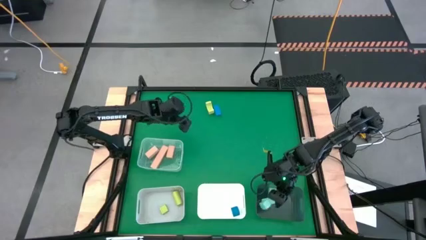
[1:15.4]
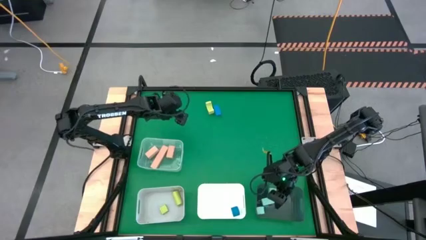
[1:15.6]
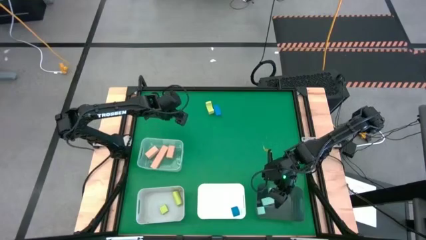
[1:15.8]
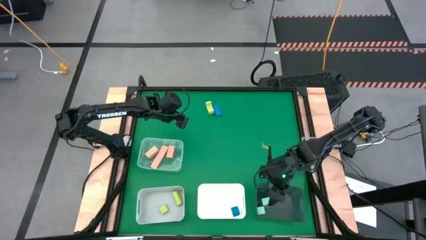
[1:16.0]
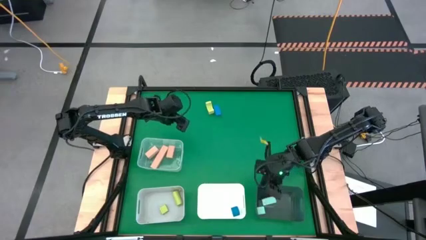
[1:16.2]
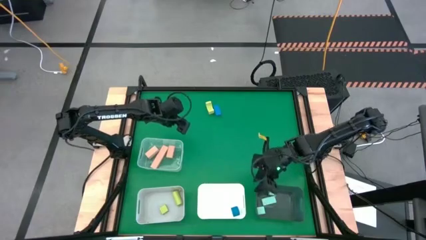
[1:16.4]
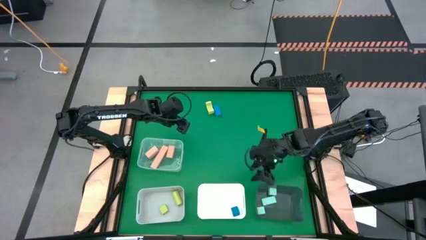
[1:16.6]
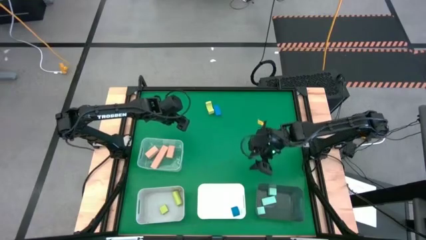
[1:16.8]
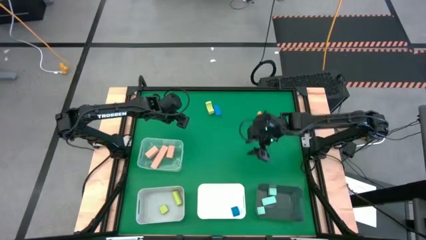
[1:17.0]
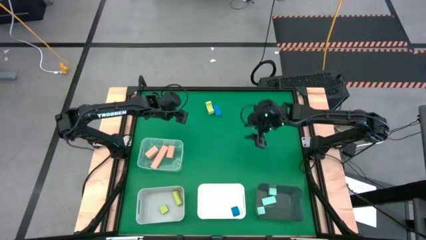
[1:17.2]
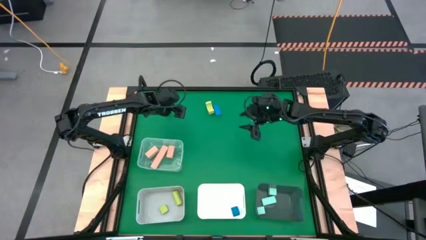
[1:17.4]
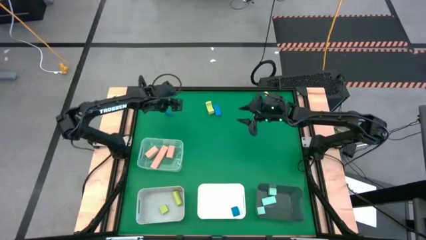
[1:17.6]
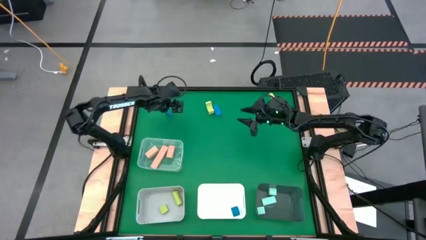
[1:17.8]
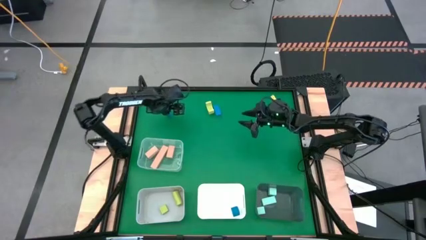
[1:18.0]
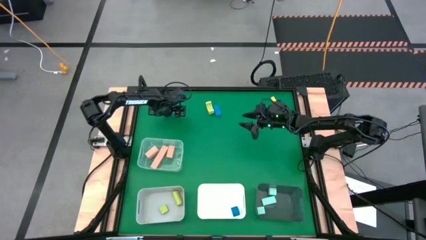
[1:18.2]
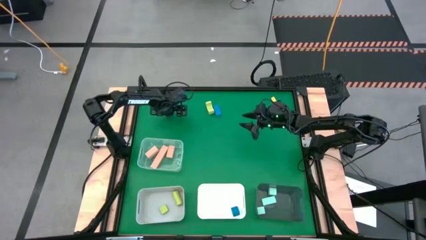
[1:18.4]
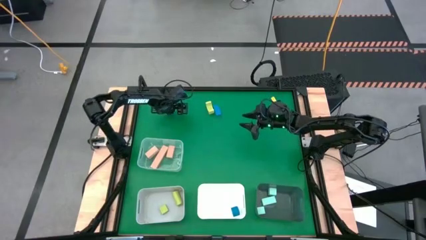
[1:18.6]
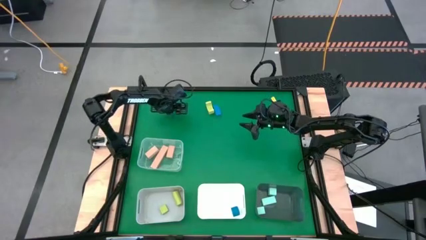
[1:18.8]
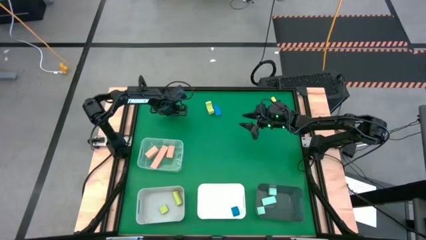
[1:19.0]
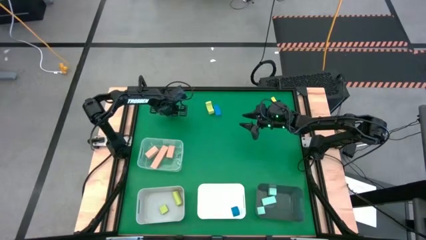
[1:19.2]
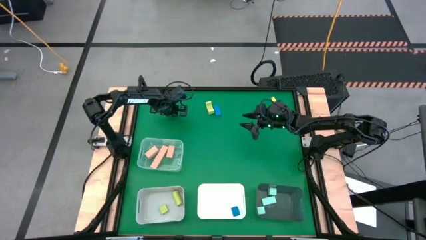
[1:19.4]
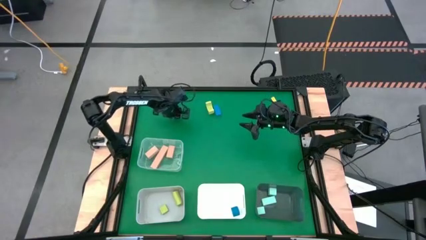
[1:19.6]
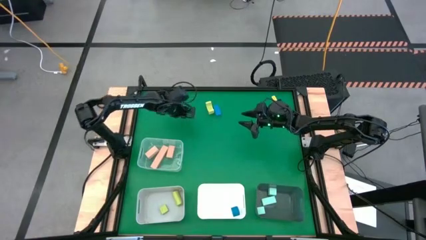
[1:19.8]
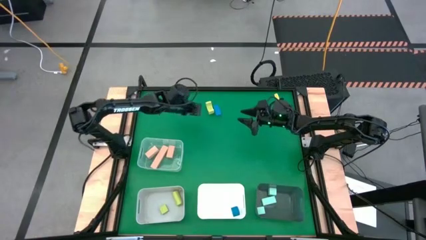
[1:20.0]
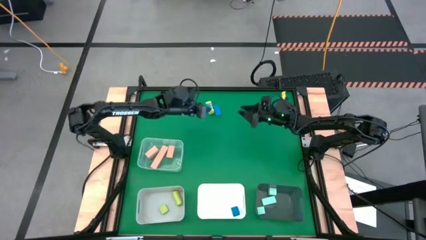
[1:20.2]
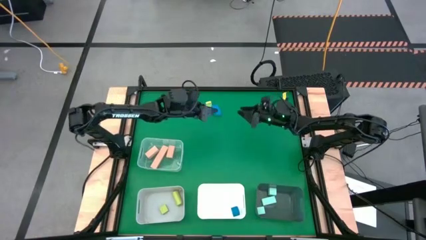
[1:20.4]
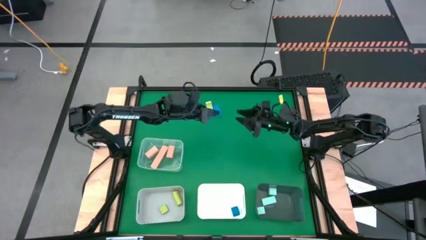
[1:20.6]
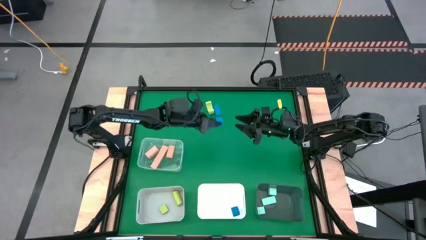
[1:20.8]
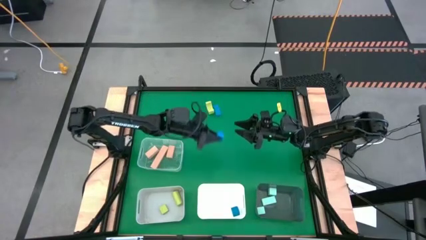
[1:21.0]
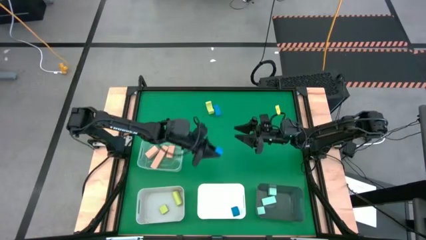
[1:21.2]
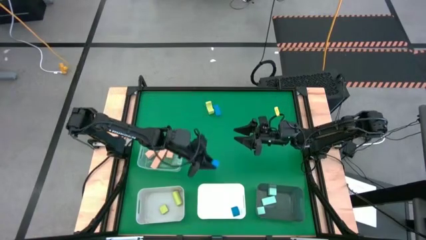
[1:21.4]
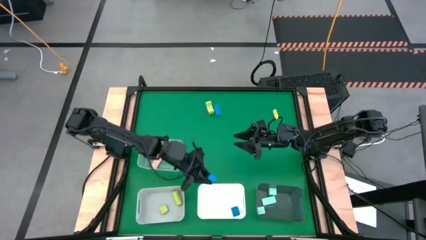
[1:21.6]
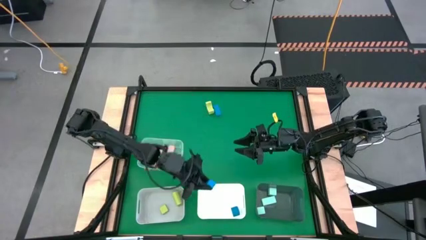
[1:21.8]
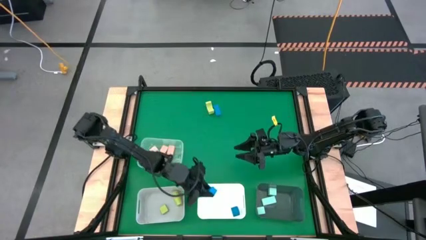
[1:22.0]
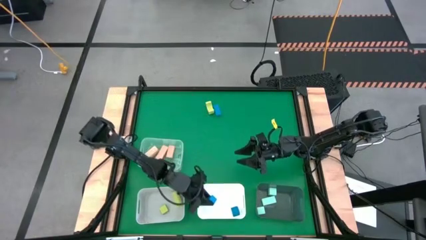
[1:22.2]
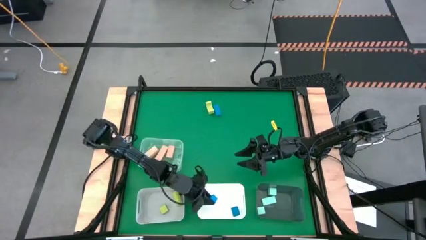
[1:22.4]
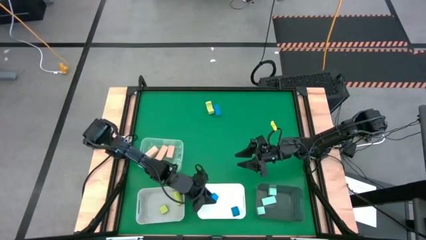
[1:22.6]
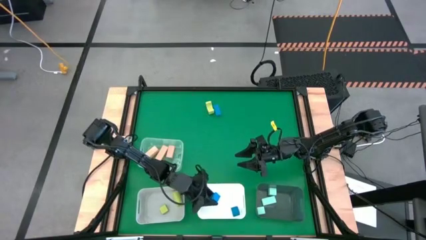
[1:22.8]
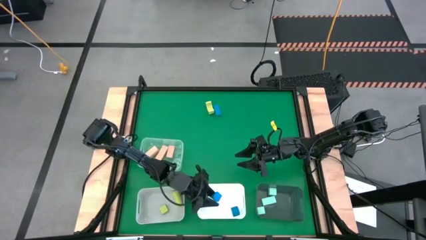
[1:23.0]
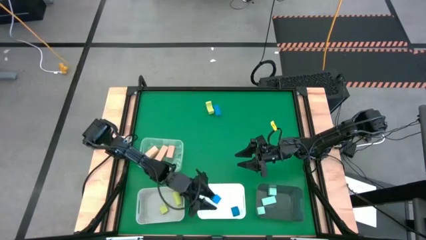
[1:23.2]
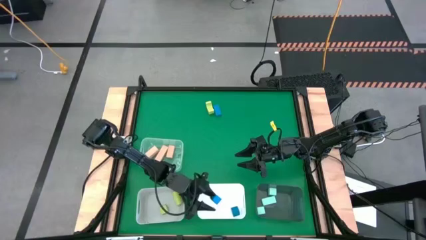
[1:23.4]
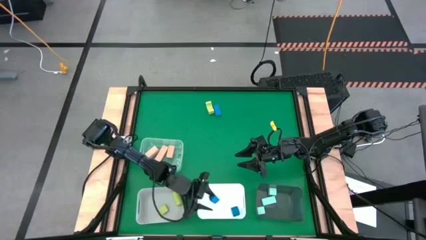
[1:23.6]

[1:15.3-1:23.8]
Task: Sort & place blocks by color
Put the left blue block into the white bin

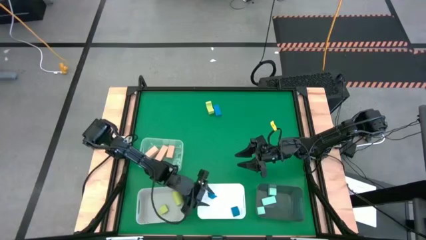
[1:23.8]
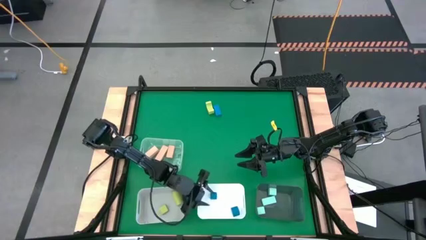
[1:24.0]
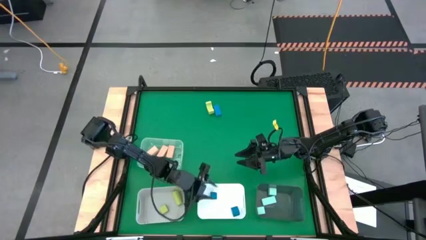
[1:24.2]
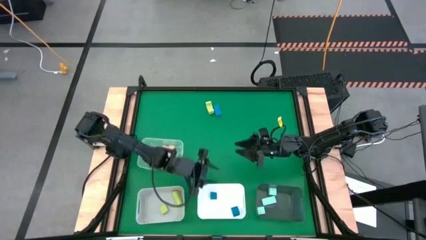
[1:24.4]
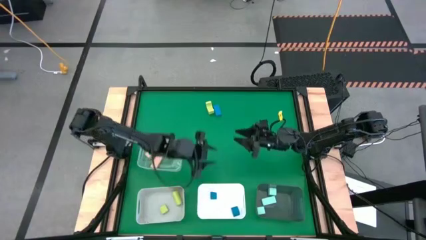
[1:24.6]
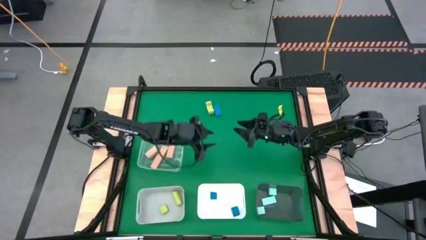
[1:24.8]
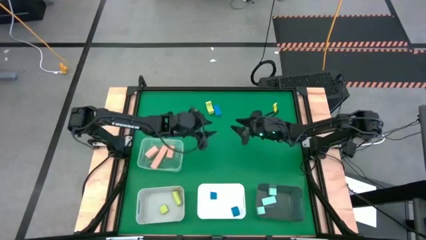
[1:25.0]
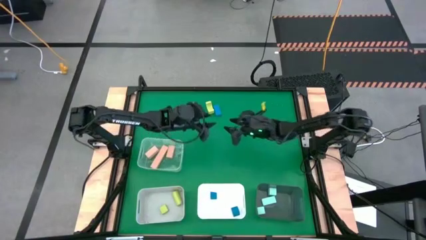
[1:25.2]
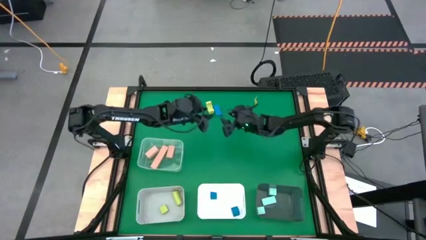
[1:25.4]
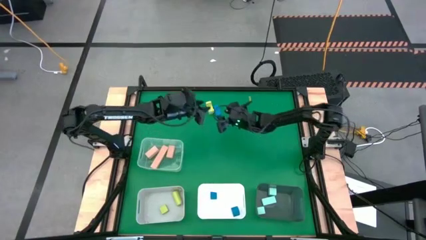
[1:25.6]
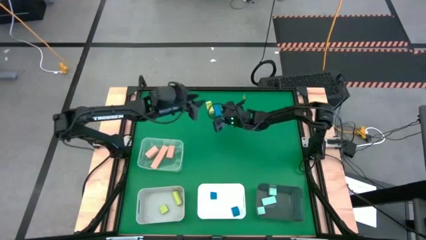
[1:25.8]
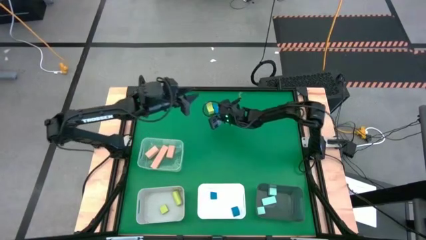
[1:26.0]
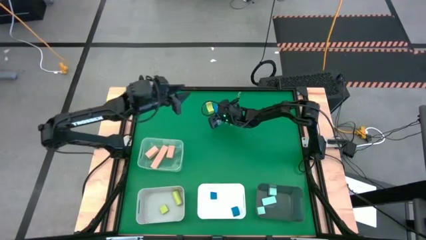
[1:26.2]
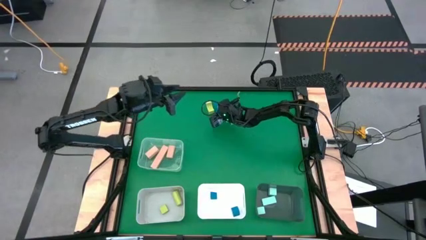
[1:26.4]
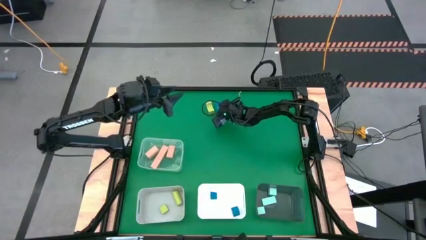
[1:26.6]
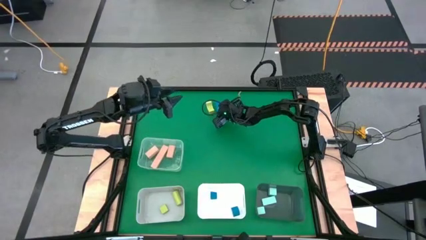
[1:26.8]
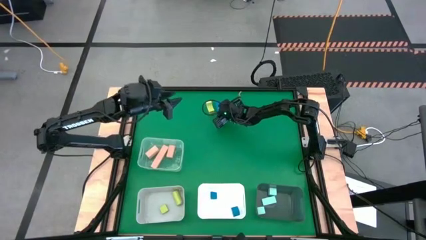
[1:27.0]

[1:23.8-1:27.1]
Put the blue block into the white bin

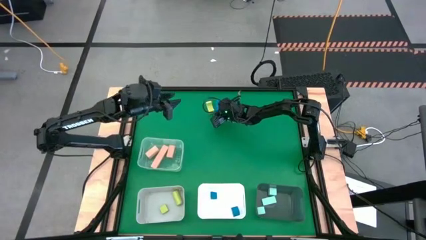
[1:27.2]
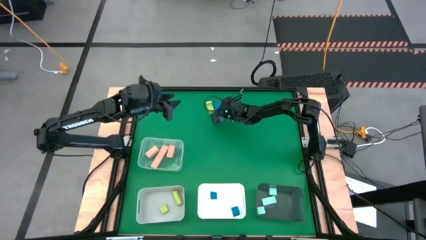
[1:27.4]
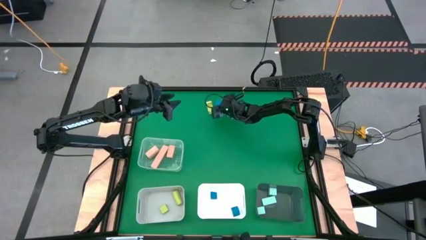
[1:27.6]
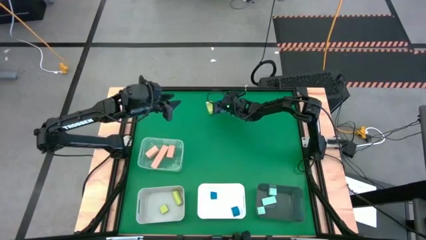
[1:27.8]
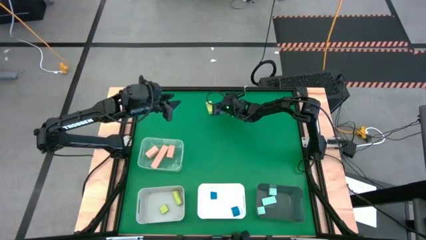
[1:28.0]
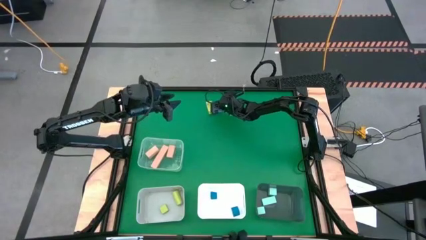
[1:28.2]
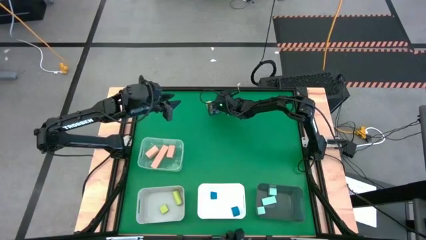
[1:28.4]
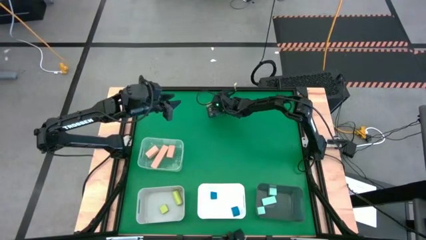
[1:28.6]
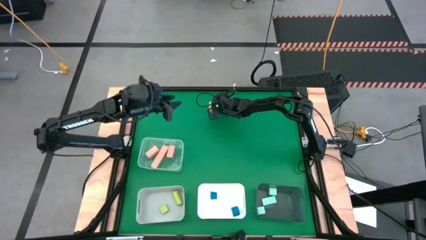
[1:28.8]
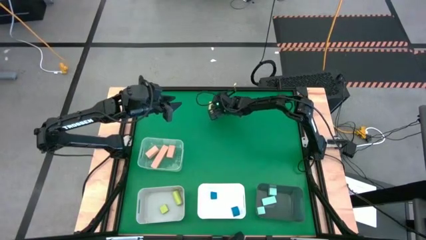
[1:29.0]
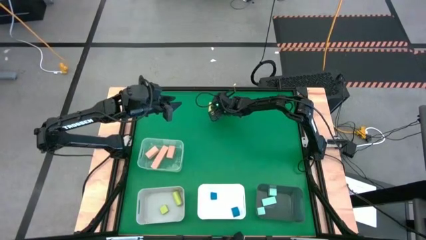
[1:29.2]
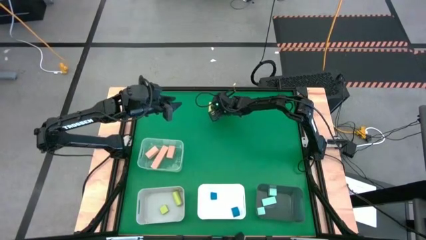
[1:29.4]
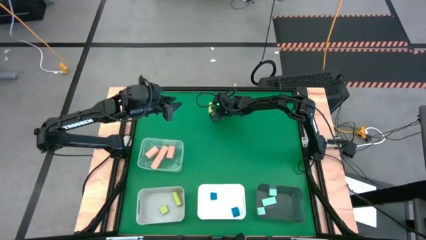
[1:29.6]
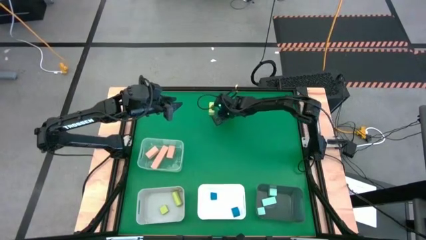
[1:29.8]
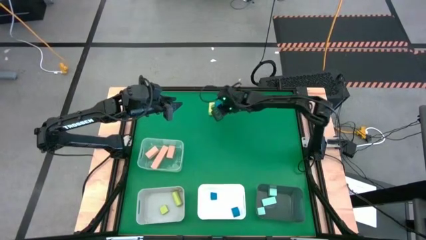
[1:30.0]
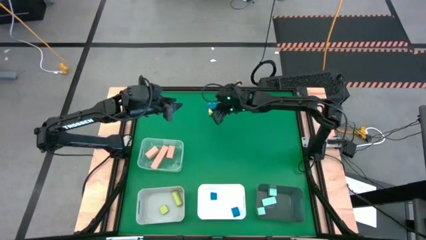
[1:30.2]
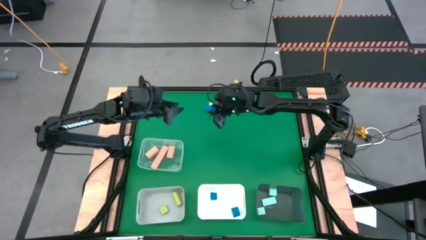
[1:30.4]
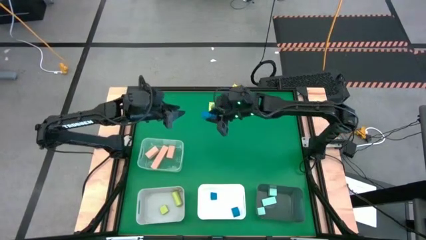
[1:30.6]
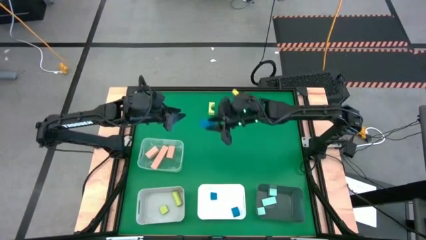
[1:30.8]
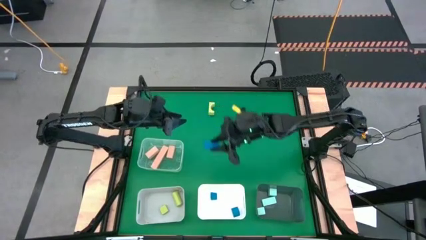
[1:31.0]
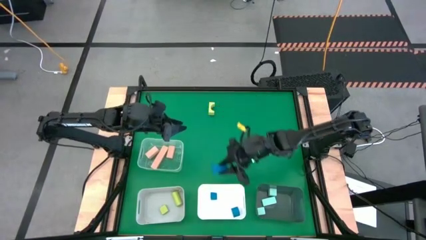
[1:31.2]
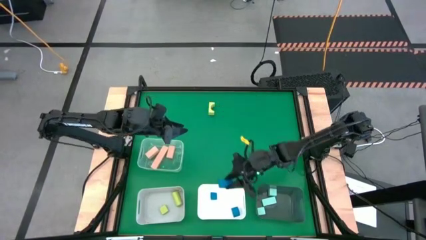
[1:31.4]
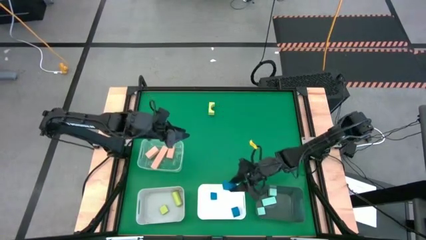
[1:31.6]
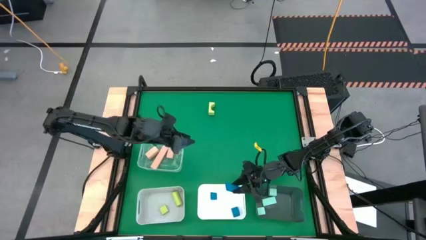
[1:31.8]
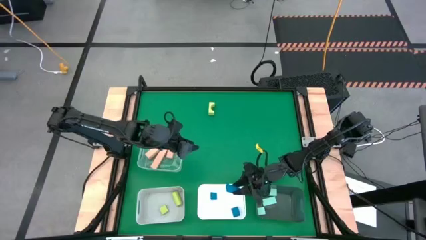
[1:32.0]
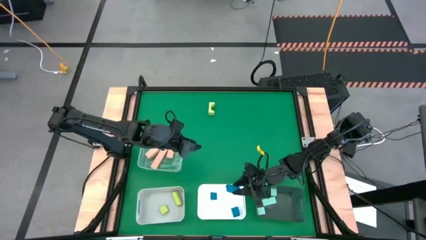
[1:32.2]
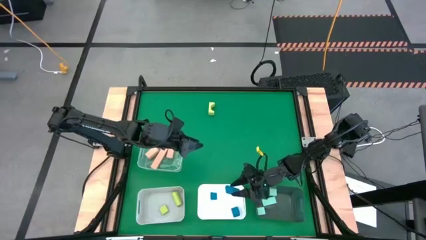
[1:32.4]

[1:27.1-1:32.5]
Put the blue block into the white bin
